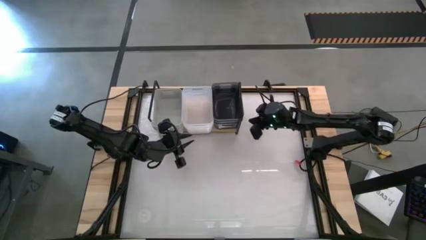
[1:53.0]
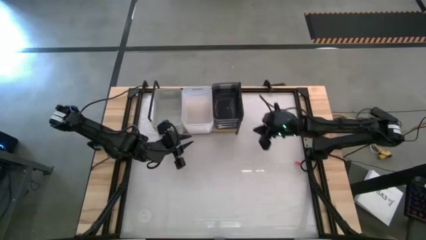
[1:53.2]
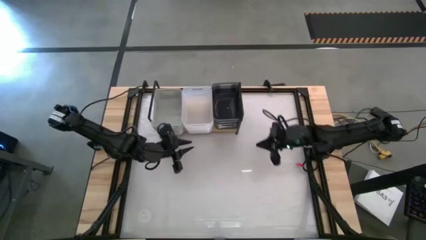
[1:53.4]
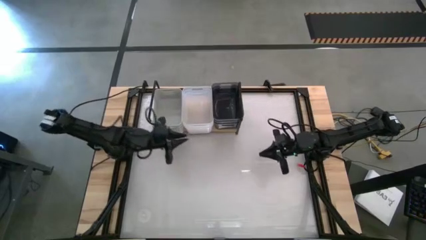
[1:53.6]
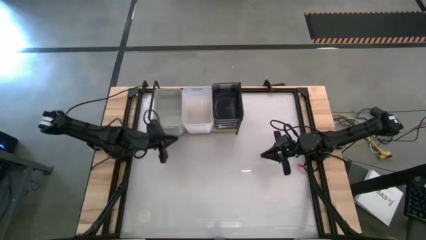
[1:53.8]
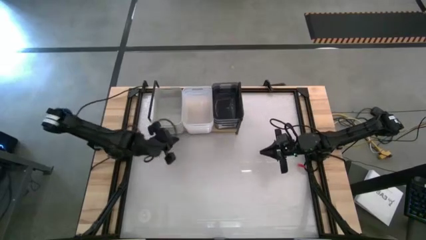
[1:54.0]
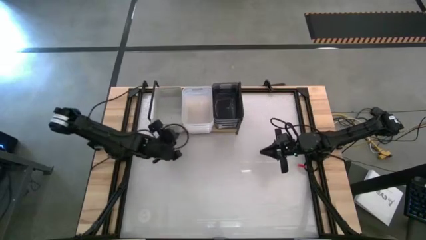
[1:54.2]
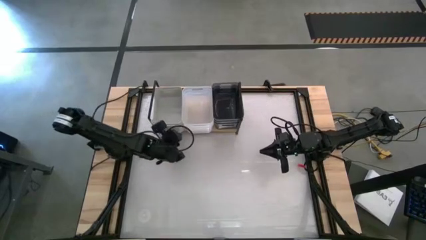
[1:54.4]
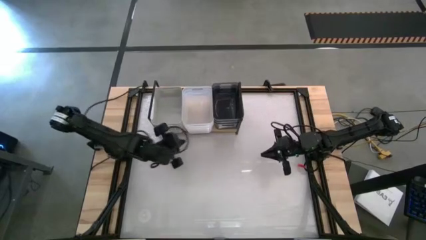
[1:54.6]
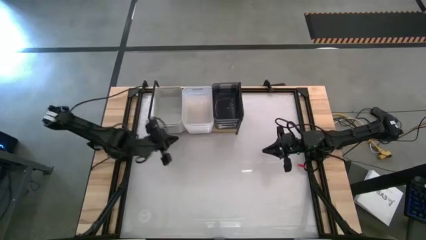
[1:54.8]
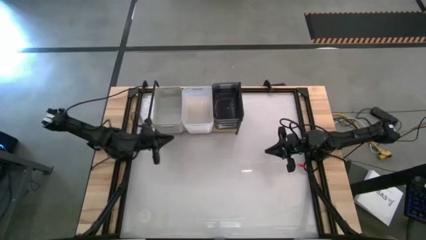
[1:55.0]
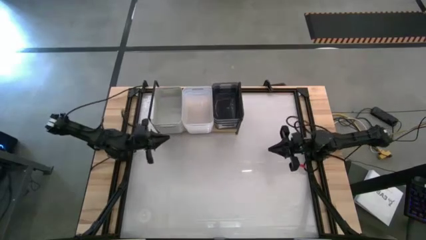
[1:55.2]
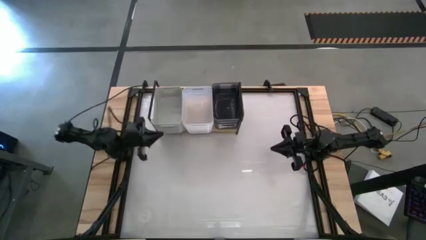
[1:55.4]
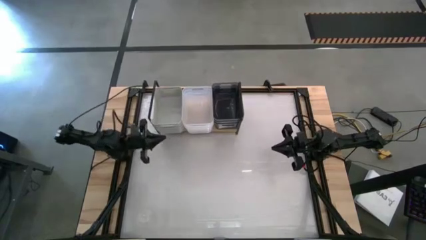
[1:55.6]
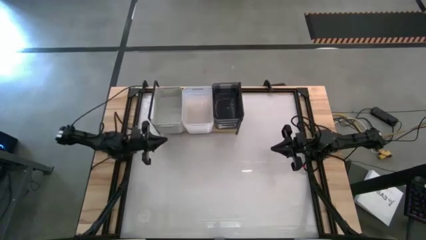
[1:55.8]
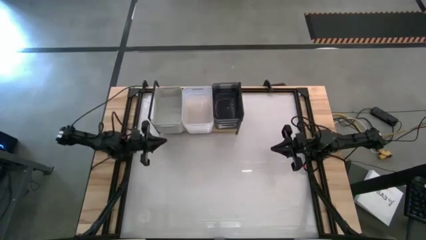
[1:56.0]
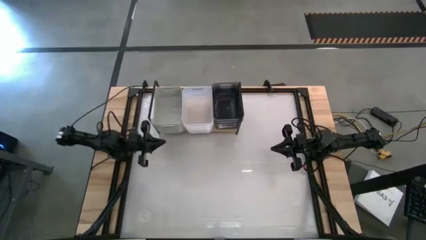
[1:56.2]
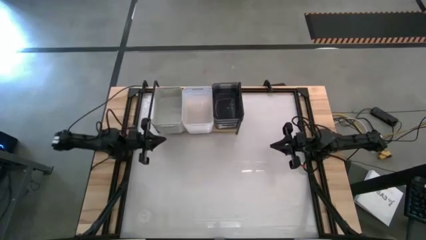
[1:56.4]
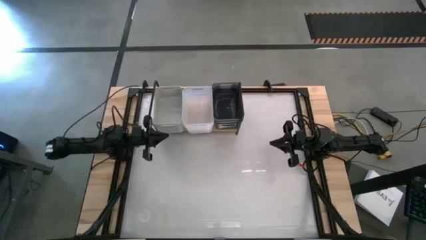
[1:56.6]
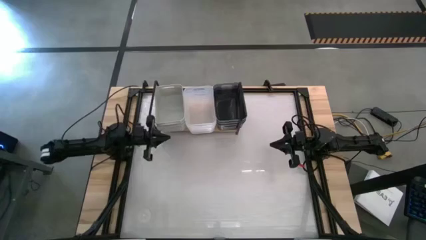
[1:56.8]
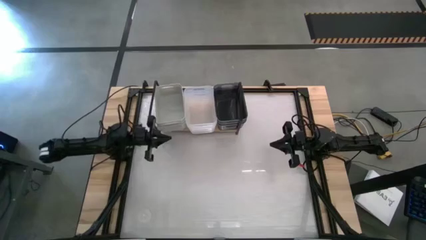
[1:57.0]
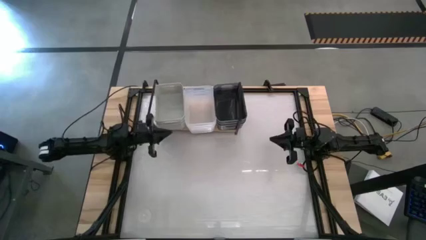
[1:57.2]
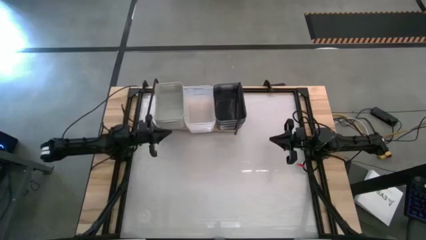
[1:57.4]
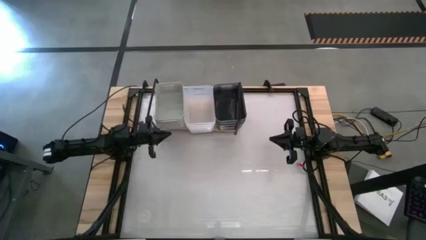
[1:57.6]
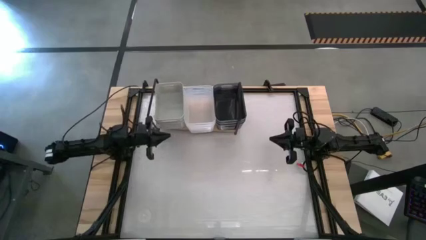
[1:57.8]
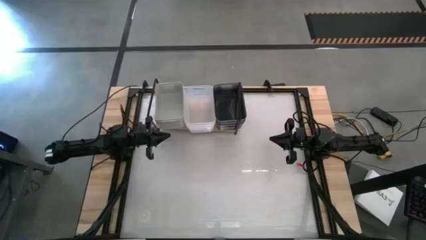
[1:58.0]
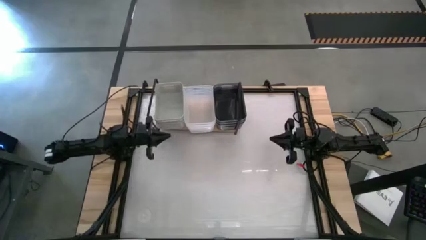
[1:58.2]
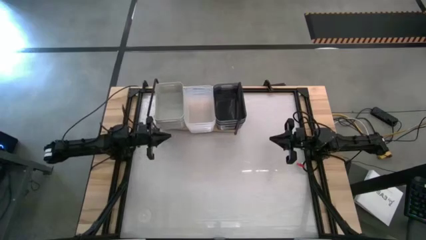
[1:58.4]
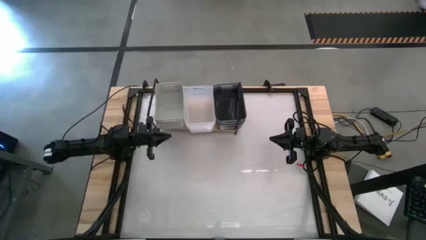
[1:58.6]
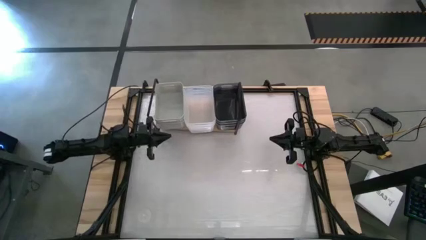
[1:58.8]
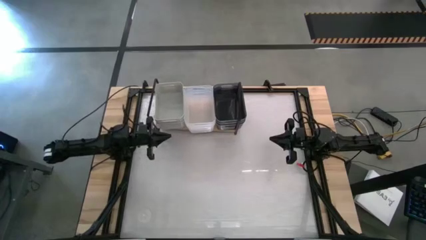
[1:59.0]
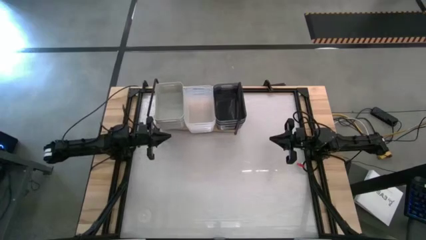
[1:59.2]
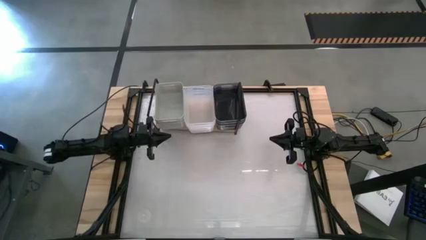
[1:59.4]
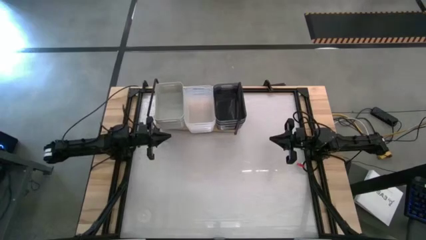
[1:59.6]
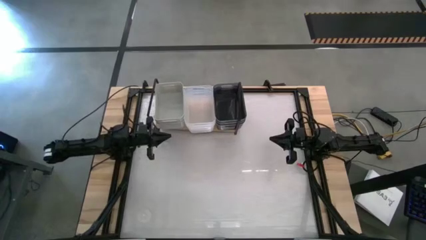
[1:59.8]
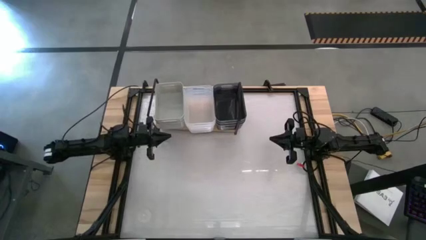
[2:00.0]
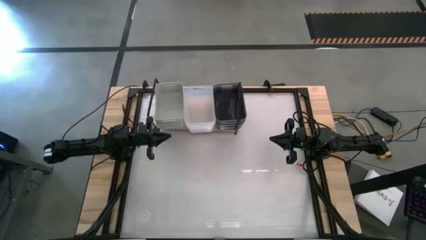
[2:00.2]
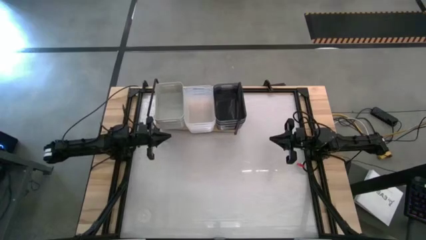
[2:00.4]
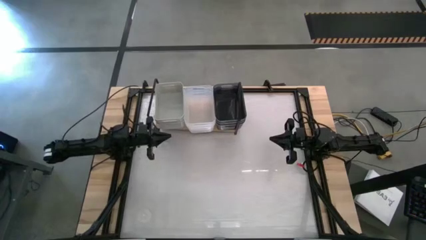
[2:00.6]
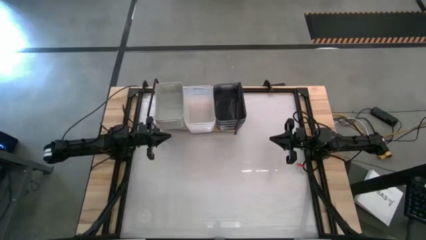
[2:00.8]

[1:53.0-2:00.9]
Task: Stack baskets on shelf by color
Return to Home Position

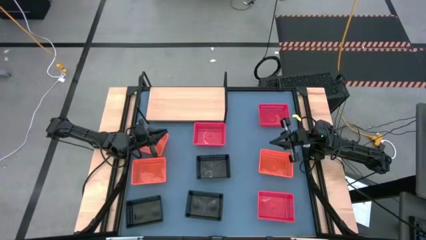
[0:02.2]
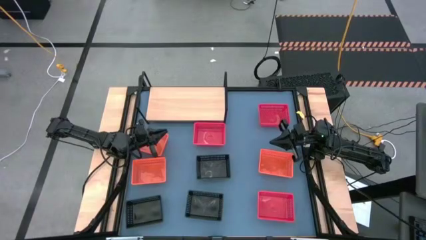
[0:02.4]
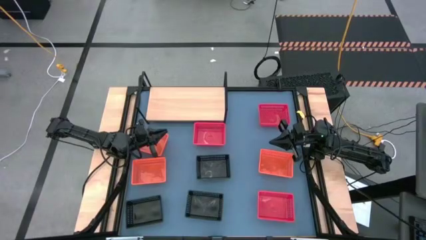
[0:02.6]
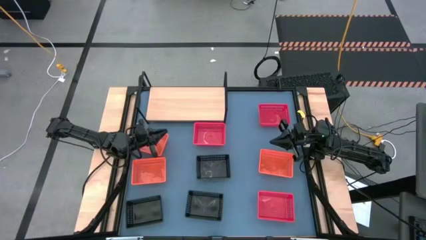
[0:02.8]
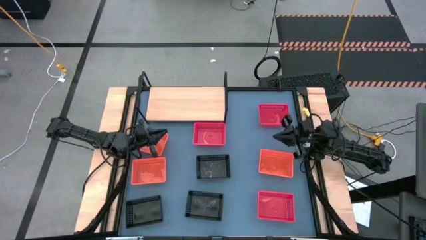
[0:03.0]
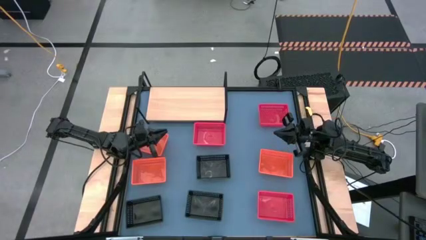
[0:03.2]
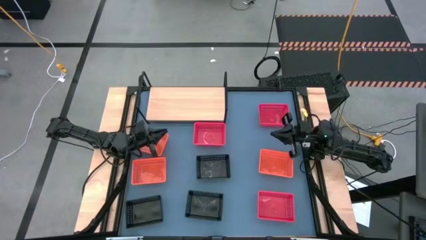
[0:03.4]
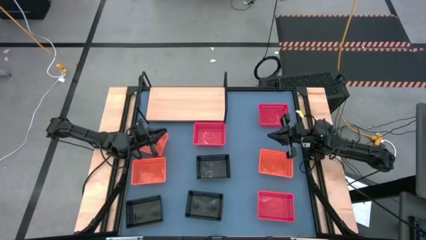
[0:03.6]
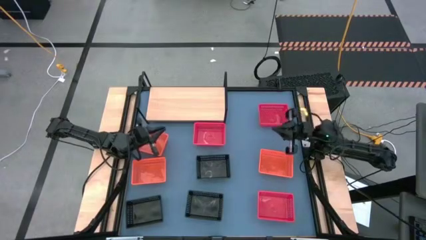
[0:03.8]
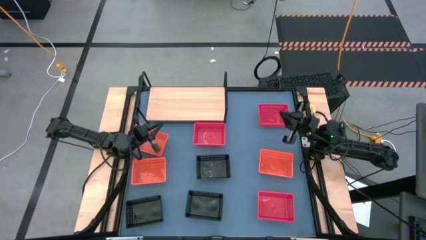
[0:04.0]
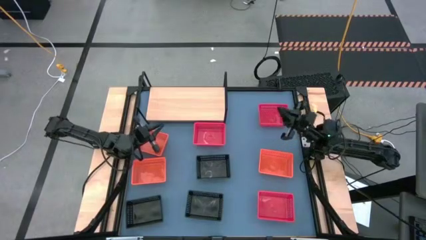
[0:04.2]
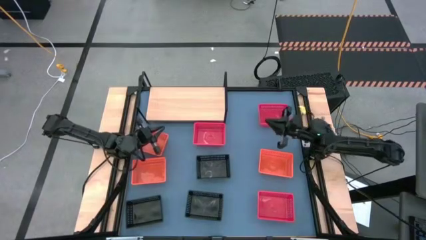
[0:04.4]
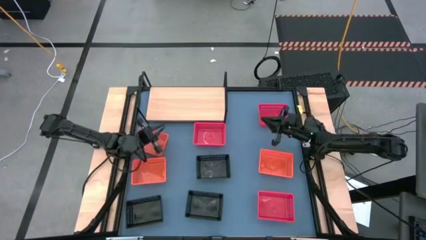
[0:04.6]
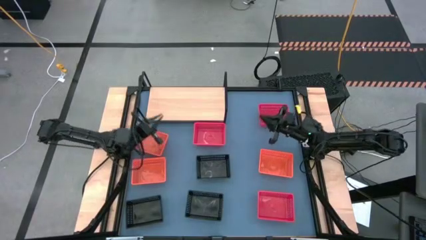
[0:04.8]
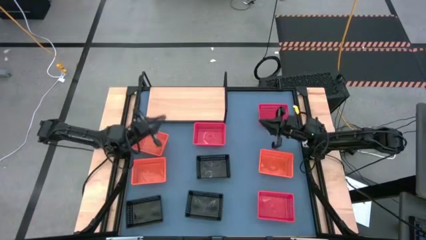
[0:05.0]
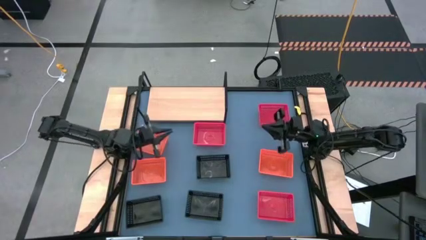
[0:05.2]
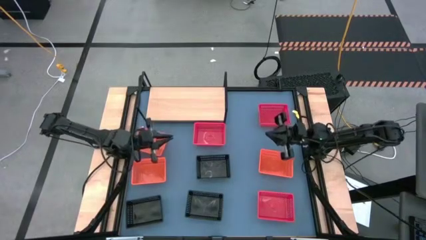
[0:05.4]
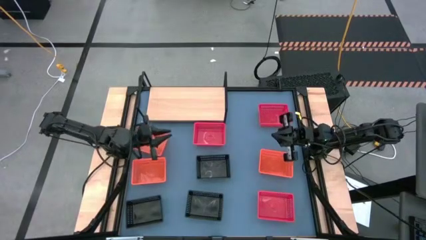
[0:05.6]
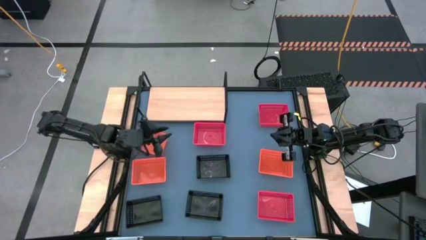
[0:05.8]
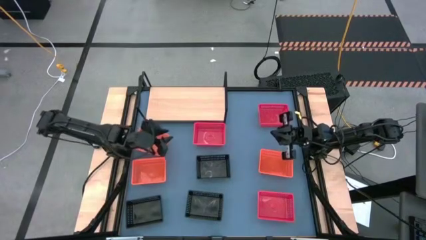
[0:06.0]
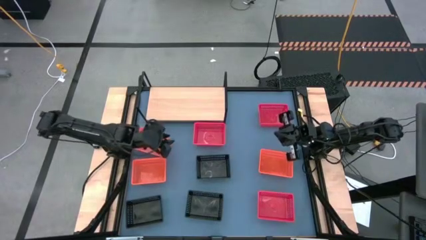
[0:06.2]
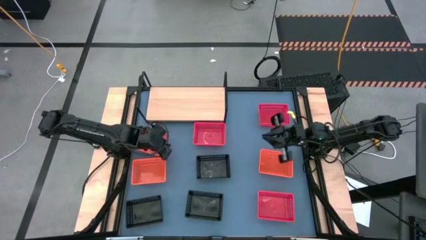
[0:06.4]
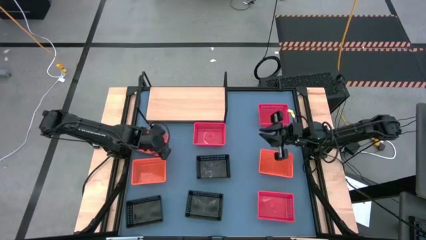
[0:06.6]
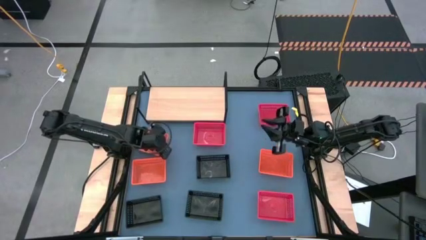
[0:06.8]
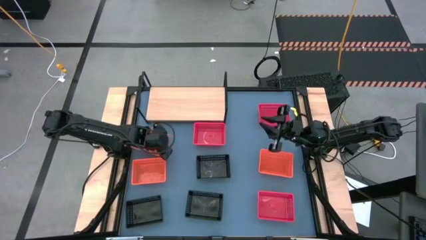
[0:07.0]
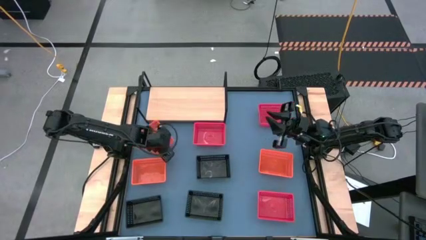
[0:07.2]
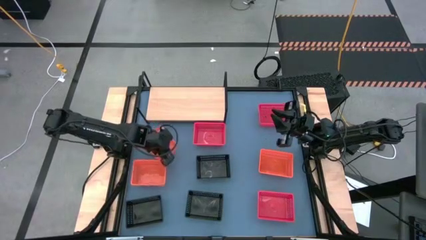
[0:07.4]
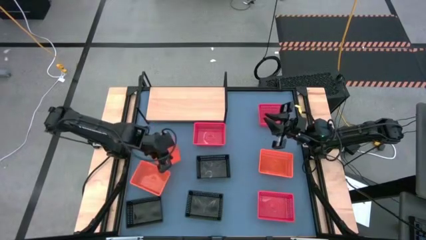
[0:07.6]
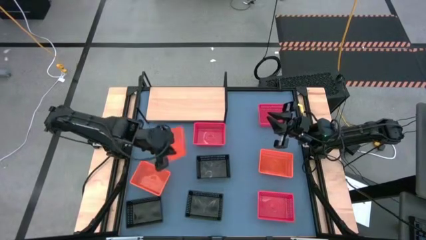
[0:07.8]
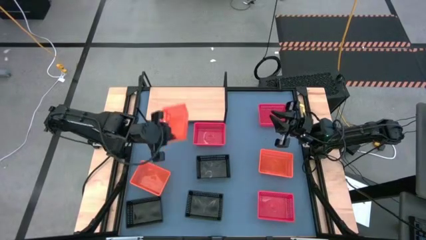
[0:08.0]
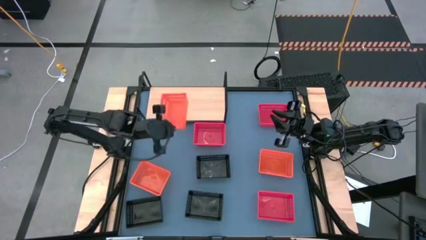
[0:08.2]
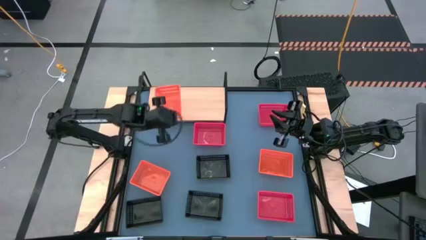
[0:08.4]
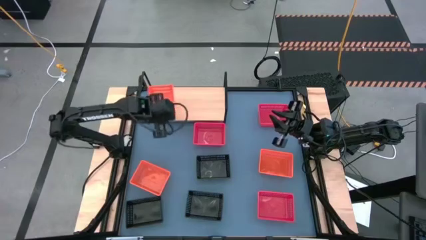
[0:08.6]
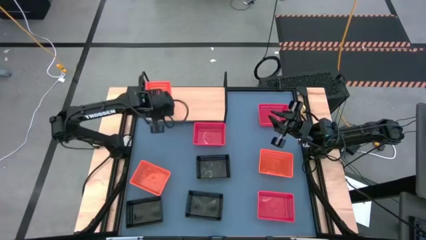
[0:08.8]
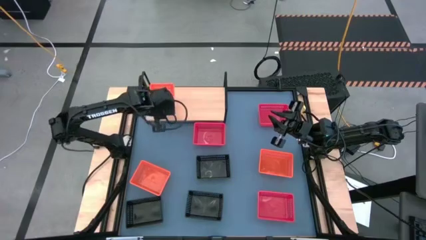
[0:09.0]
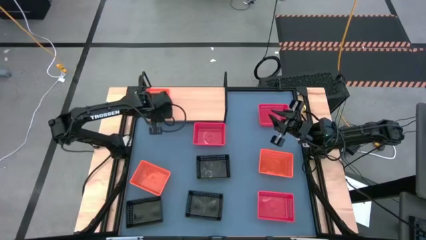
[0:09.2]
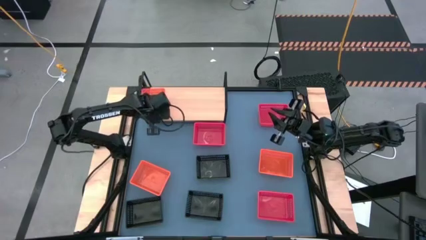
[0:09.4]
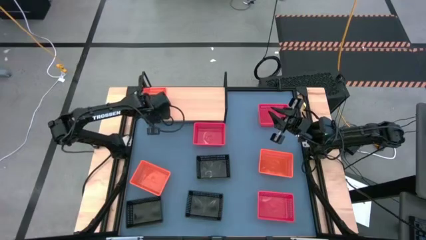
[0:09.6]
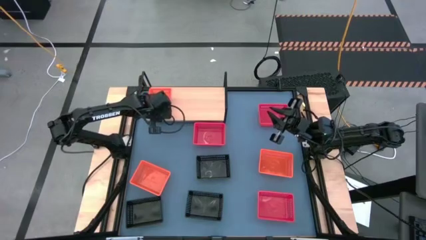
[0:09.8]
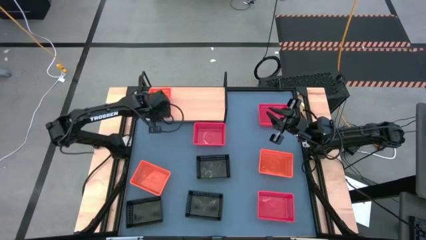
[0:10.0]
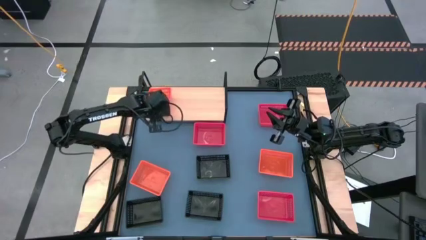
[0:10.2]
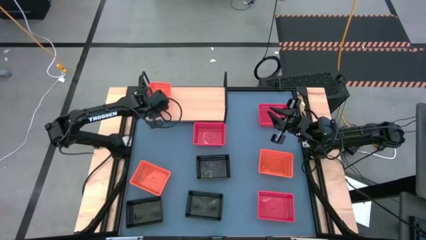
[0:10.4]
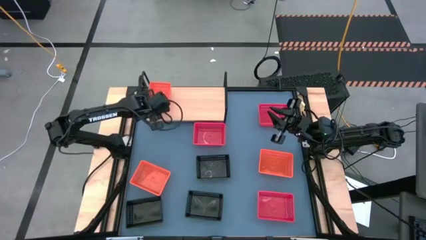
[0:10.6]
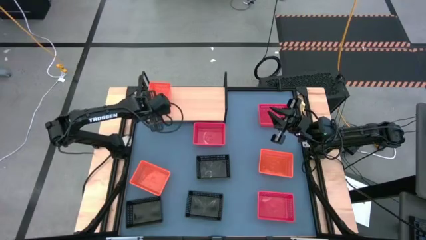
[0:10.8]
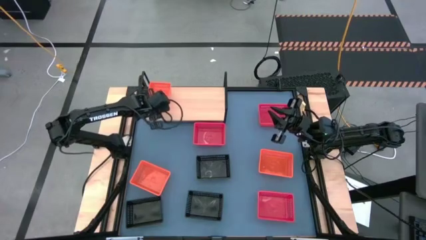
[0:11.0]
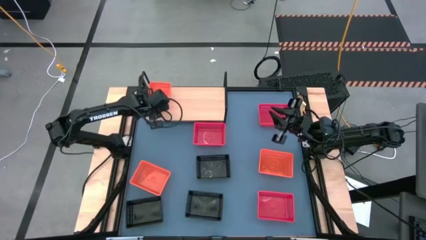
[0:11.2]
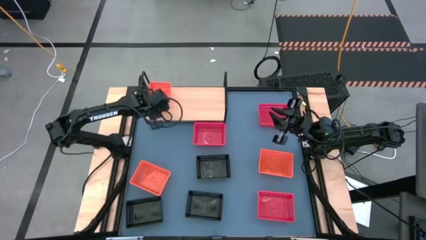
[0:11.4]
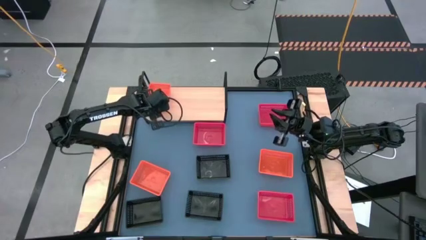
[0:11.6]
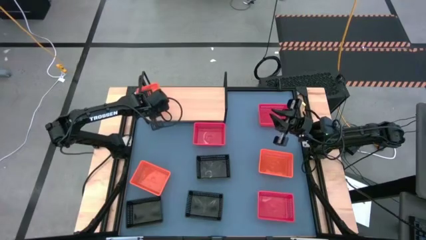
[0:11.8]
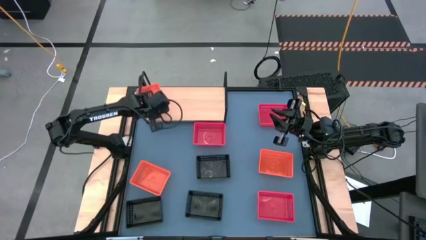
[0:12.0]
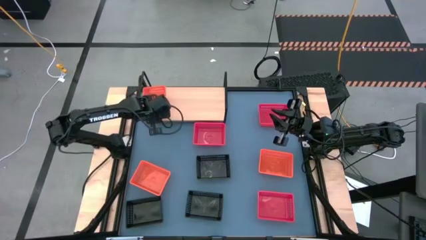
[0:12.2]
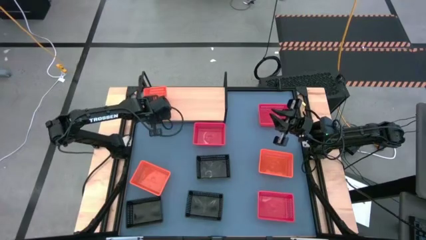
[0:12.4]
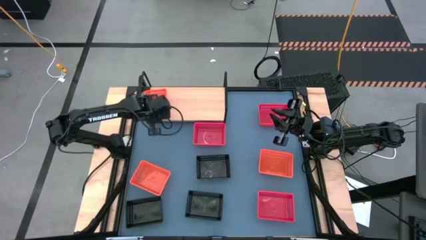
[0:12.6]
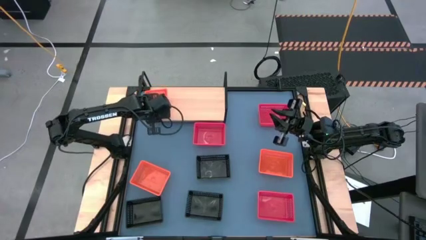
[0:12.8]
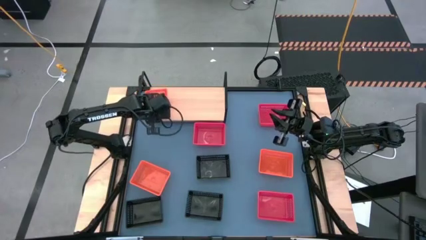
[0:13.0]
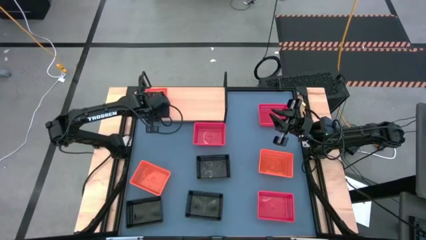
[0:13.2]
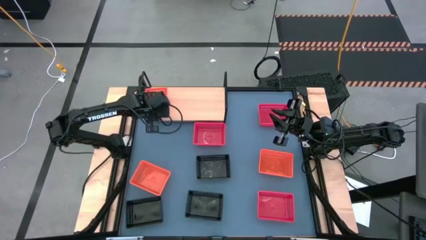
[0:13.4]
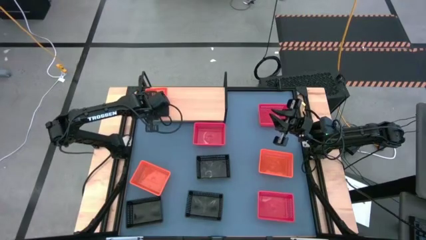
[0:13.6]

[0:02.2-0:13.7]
Task: Stack baskets on shelf by color
Put the top orange bin on the shelf
